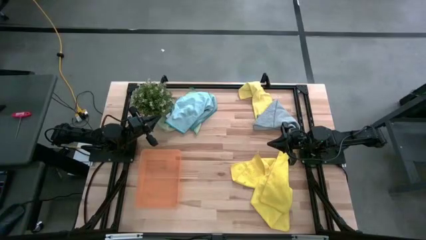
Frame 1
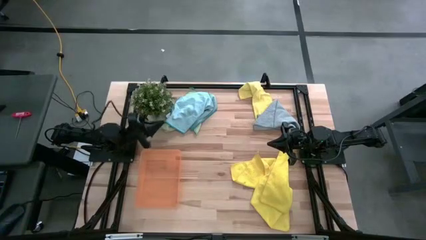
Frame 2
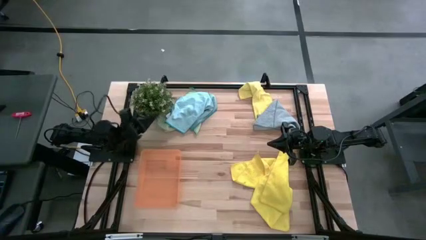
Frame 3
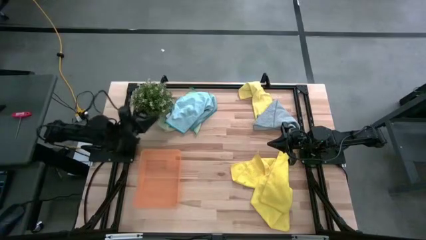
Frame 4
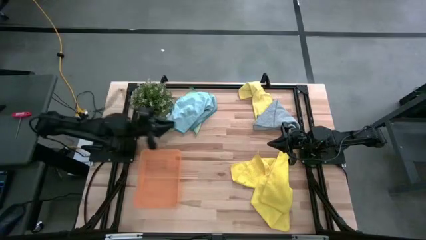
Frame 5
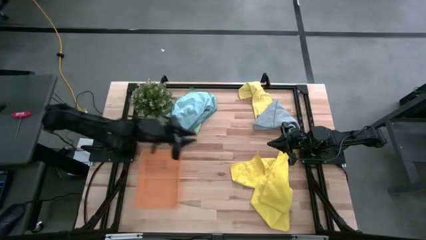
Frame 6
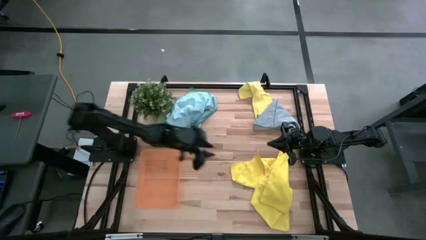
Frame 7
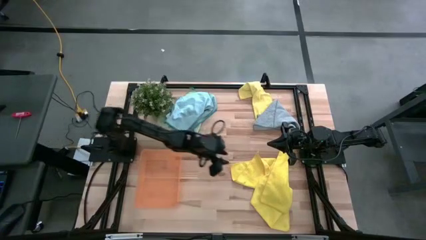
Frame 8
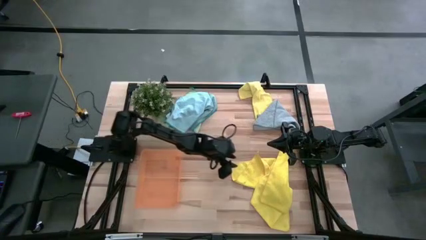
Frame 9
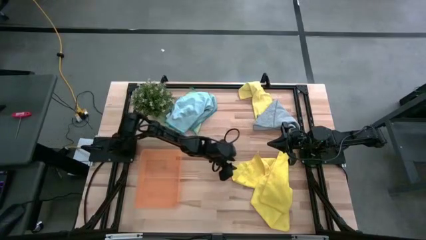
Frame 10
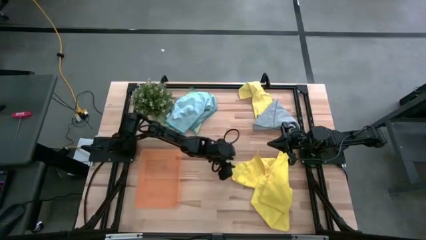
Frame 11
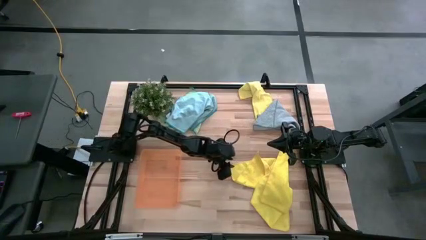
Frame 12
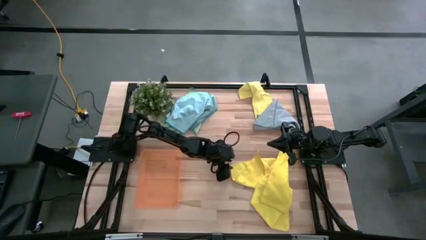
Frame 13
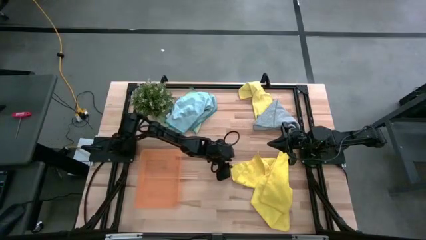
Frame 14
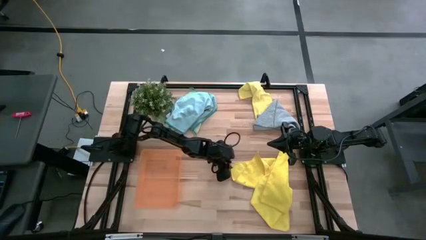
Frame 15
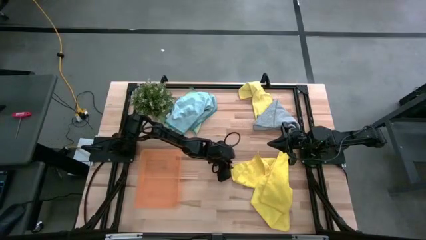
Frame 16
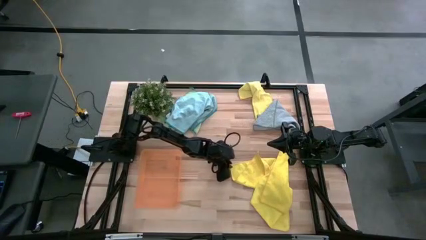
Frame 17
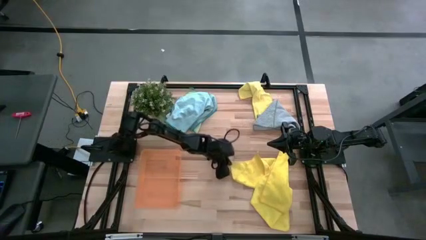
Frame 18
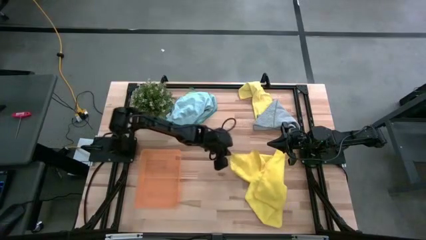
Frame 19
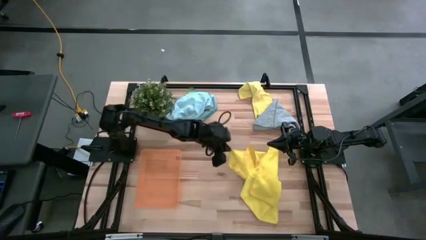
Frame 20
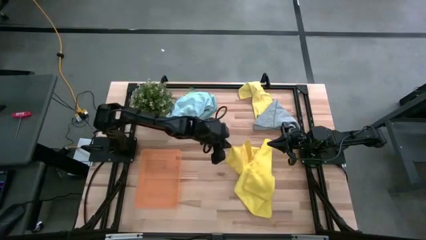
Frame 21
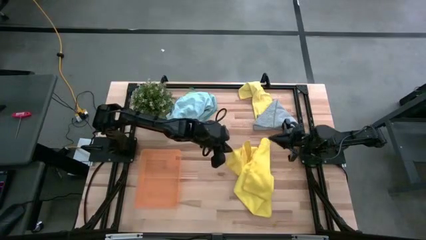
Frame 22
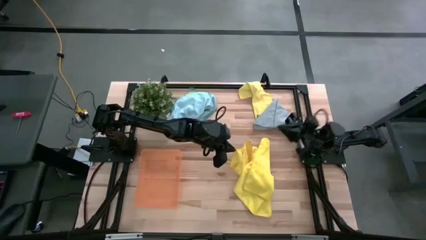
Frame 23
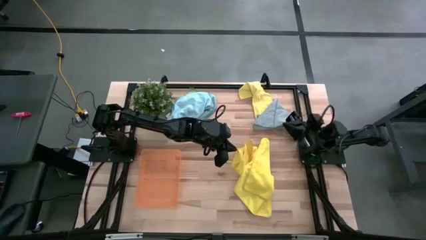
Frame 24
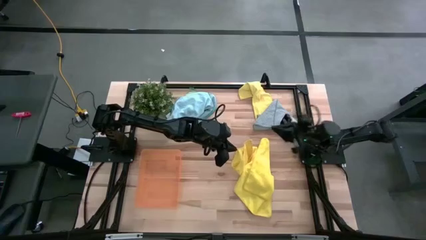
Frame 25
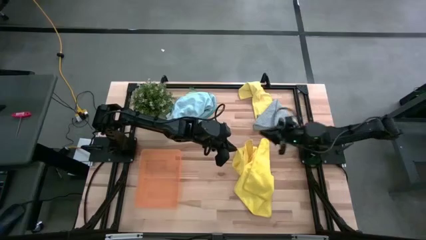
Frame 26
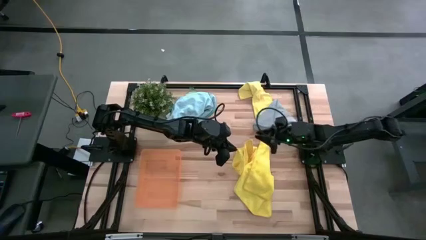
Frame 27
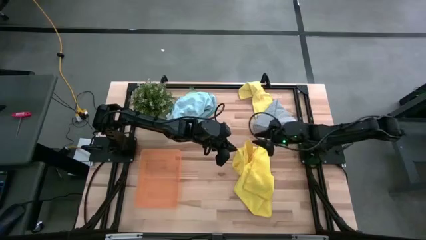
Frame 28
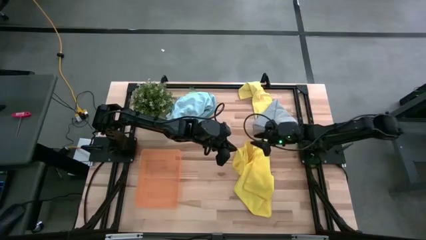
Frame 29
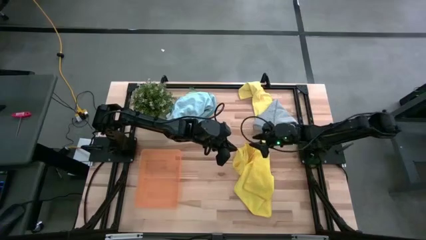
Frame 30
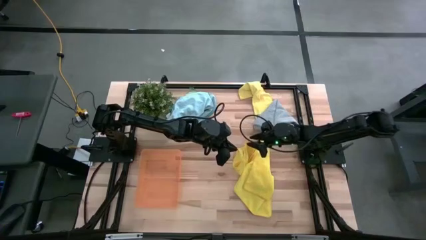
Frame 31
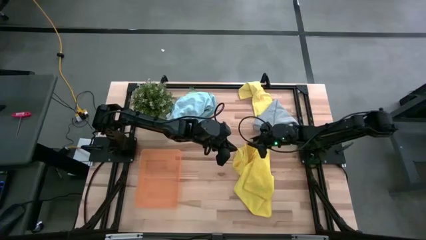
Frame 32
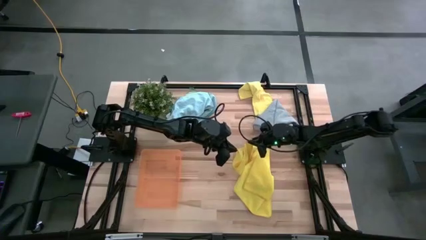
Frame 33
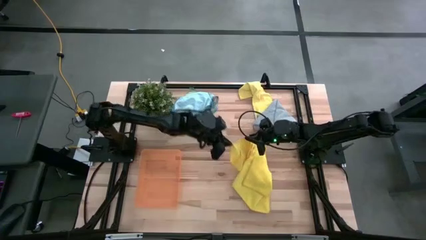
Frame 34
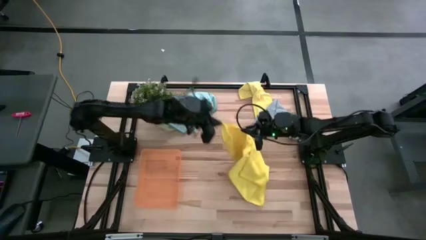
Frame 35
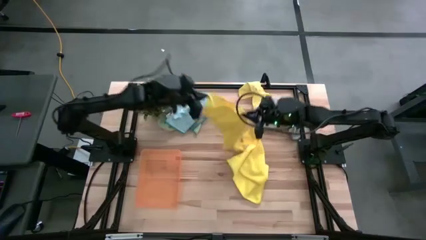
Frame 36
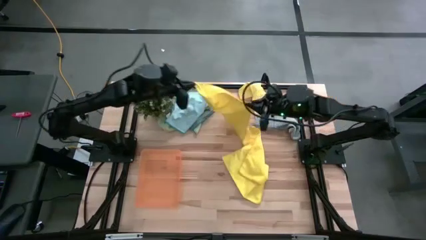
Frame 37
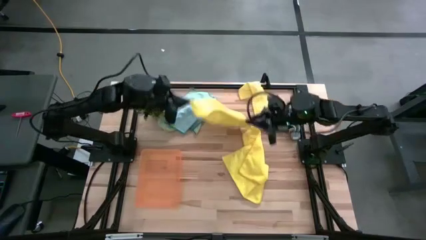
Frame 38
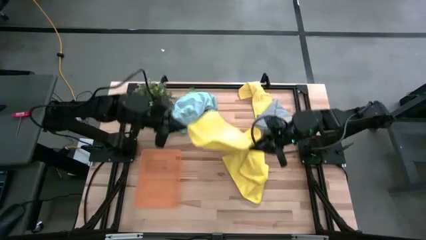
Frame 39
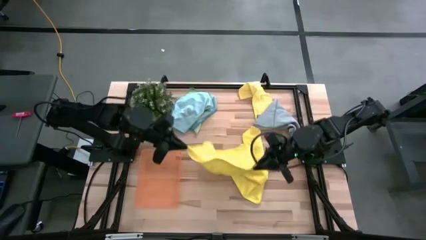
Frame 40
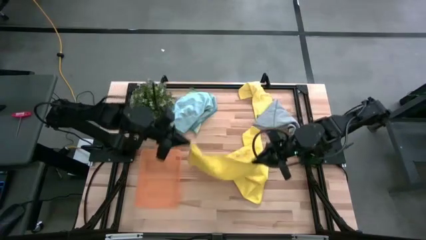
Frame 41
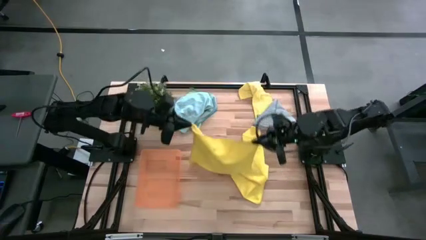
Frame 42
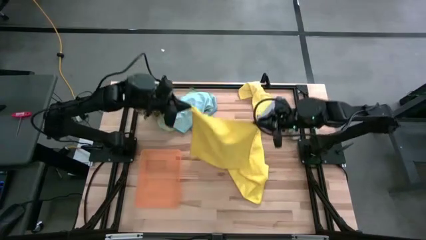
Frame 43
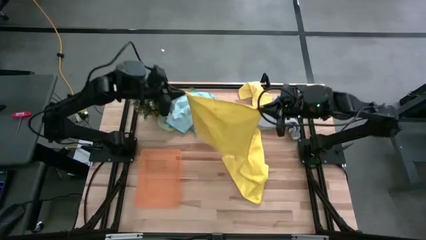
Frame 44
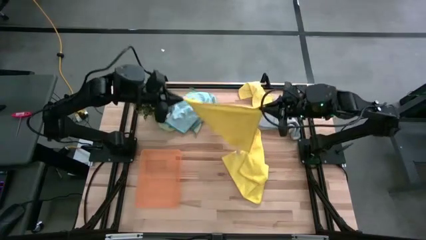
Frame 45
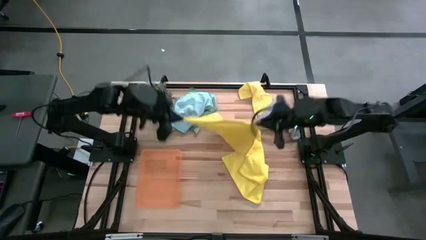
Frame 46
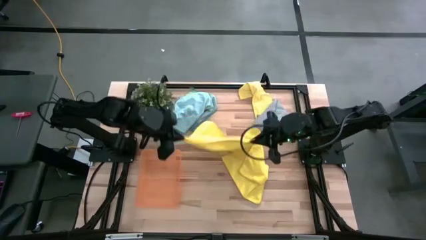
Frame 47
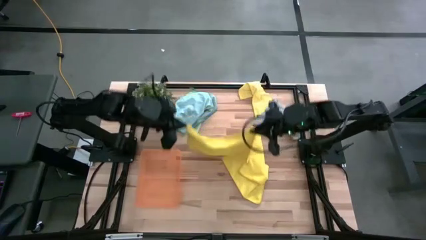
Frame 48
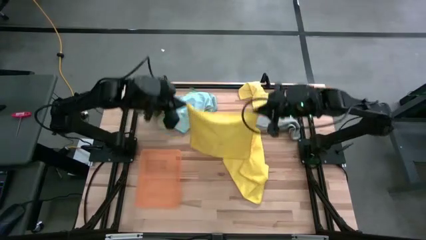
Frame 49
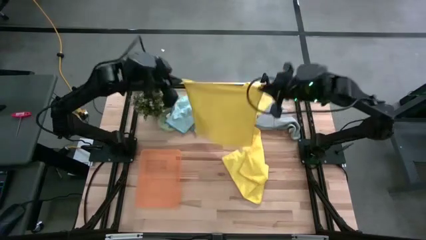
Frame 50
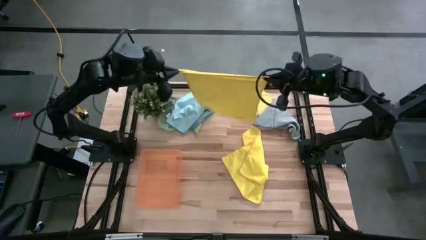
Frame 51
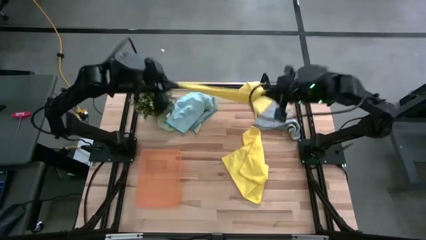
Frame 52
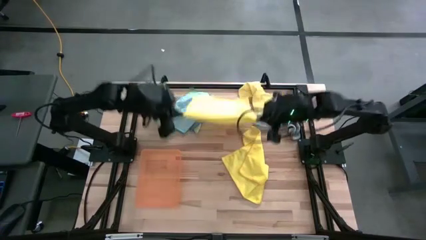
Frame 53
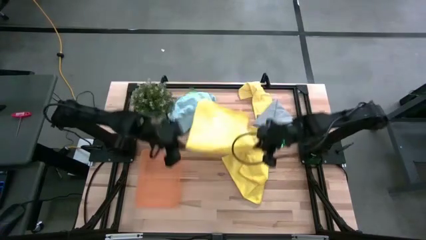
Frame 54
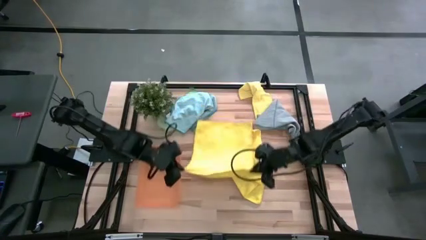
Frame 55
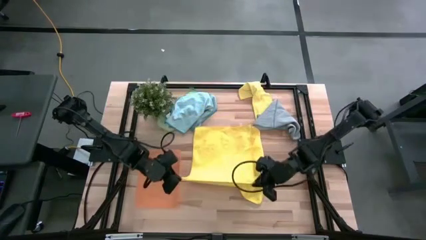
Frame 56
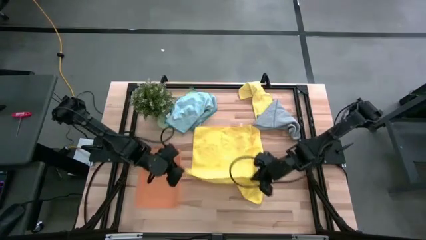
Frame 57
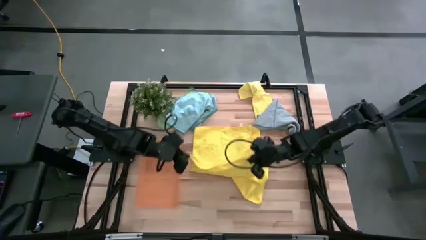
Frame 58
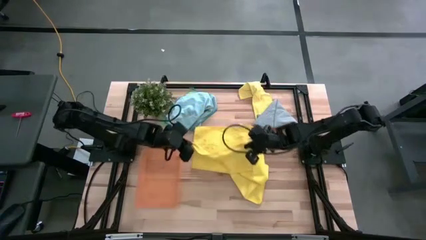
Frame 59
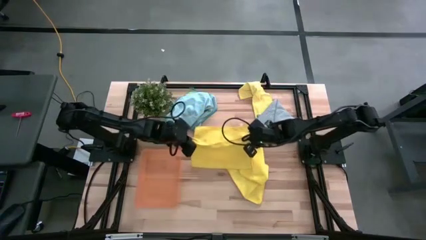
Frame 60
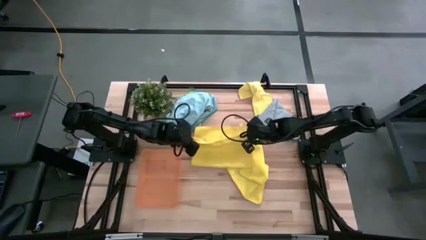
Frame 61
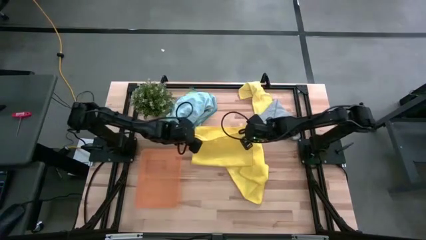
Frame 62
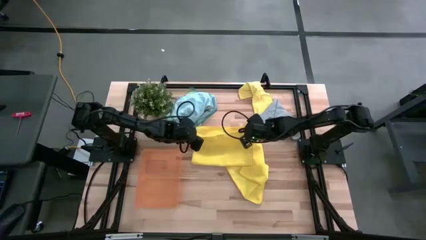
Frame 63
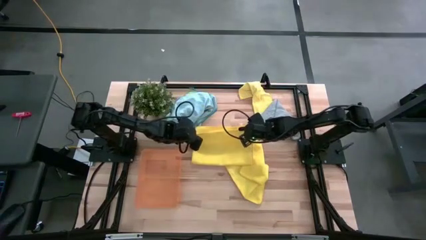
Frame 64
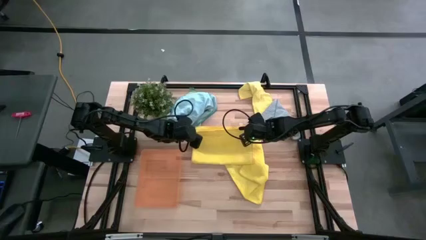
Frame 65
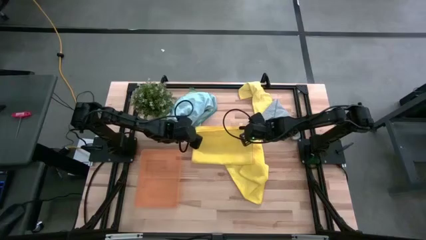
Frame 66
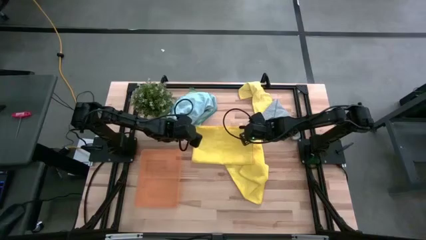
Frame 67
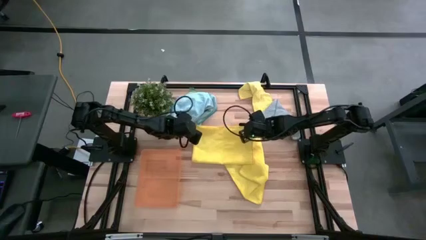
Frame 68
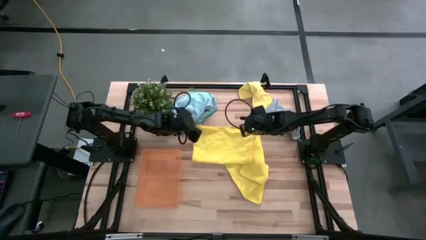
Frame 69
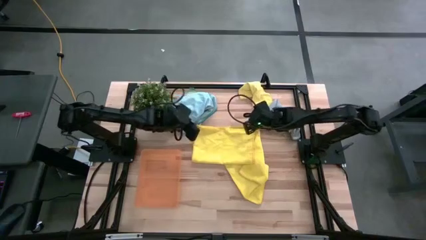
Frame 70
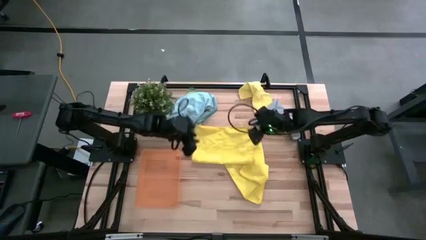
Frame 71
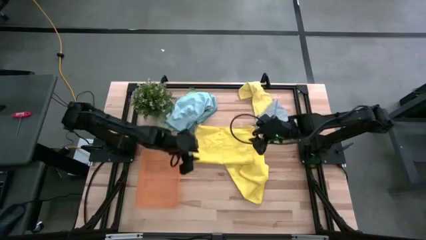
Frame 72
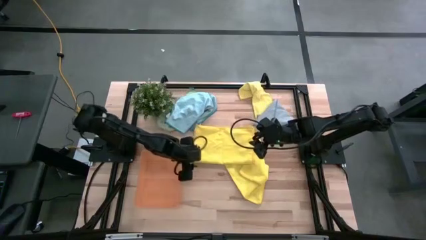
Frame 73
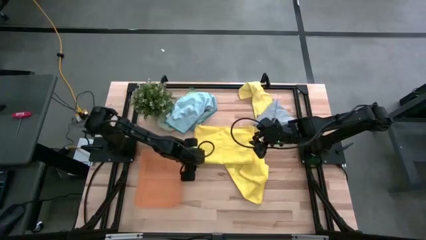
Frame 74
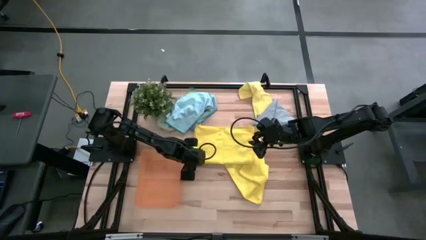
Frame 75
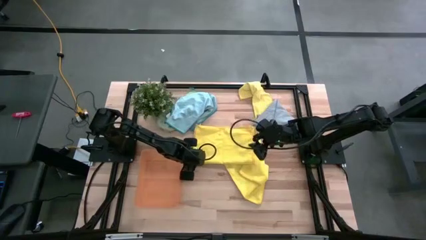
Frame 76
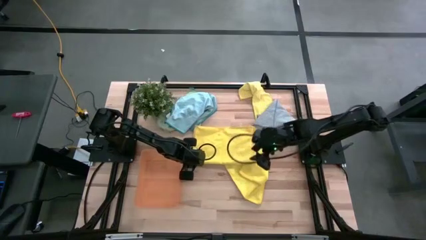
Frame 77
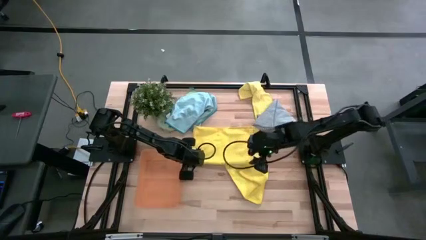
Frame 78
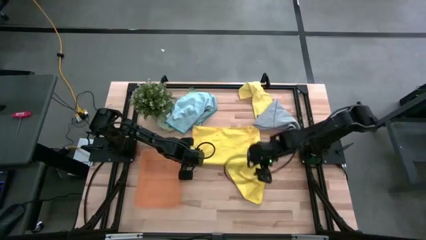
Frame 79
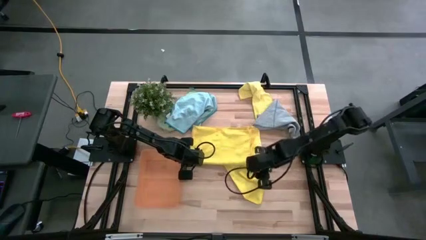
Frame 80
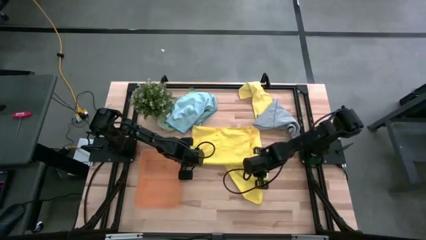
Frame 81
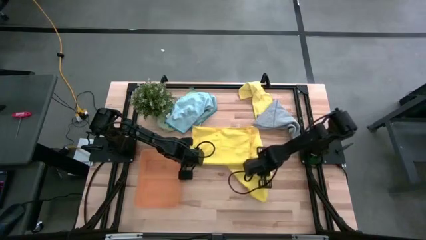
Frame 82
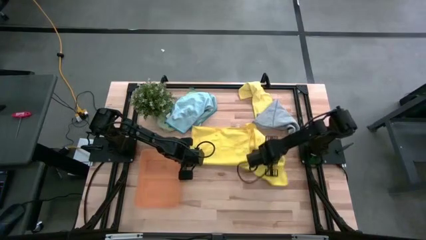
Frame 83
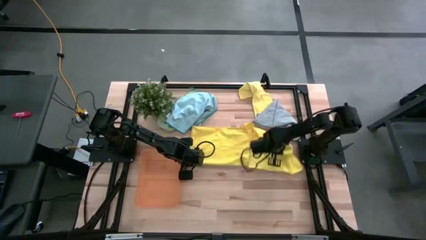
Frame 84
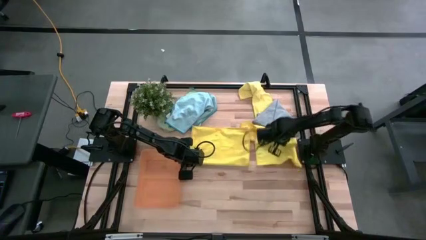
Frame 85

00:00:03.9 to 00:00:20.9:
Task: Fold microfiber towels
Fold the bottom yellow microfiber towel
